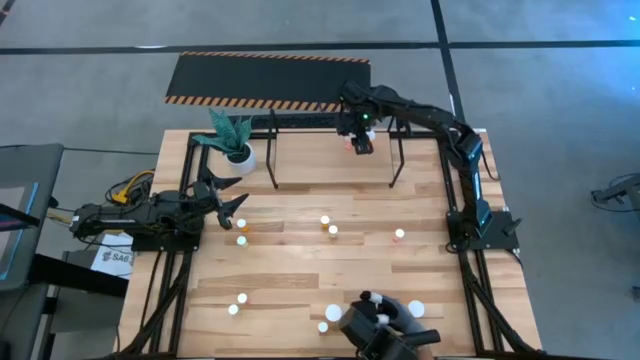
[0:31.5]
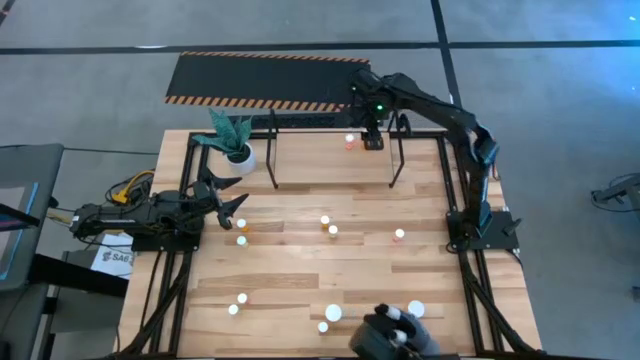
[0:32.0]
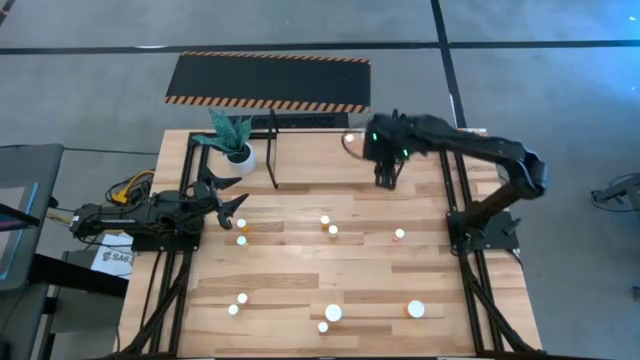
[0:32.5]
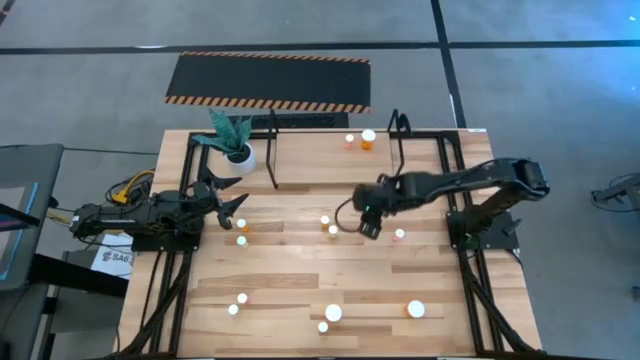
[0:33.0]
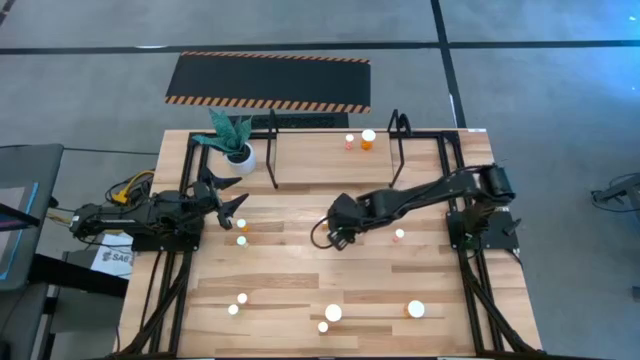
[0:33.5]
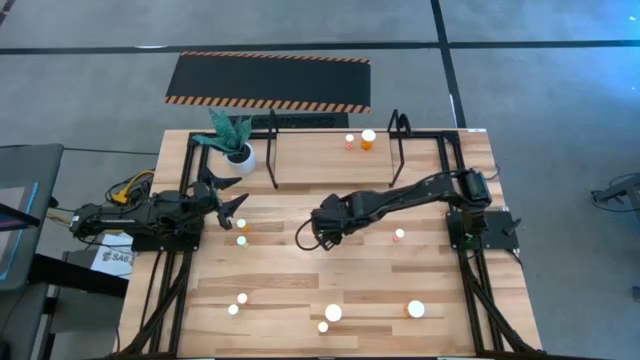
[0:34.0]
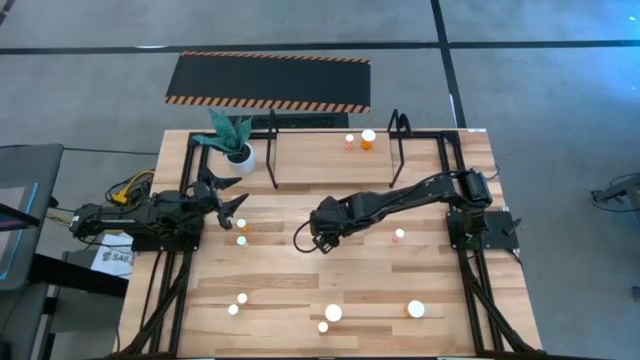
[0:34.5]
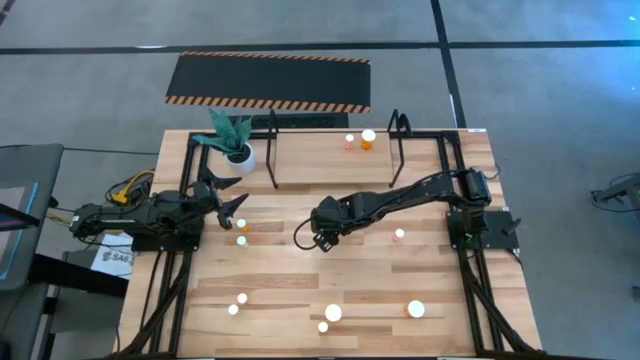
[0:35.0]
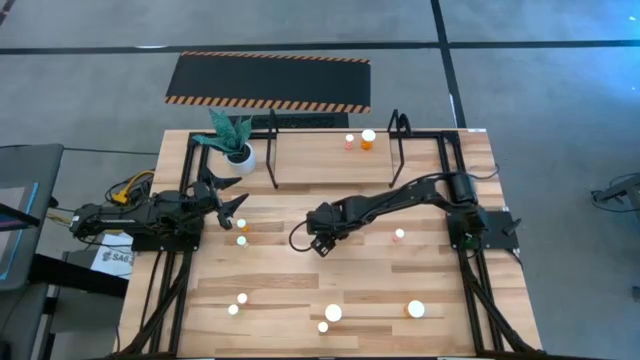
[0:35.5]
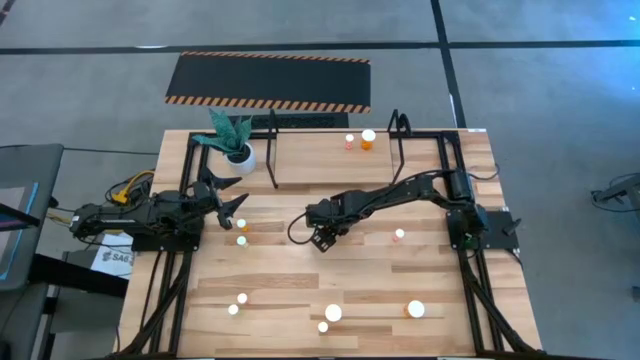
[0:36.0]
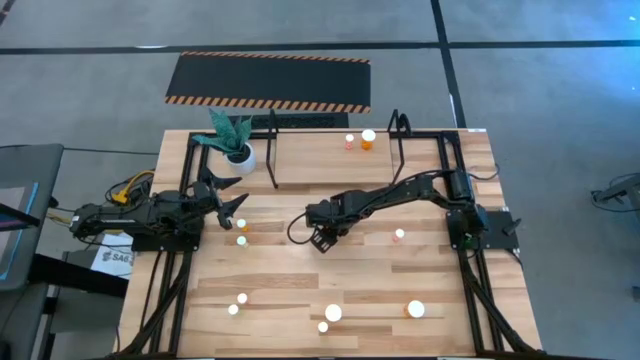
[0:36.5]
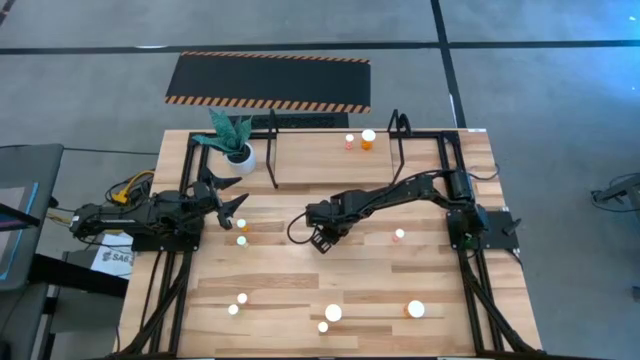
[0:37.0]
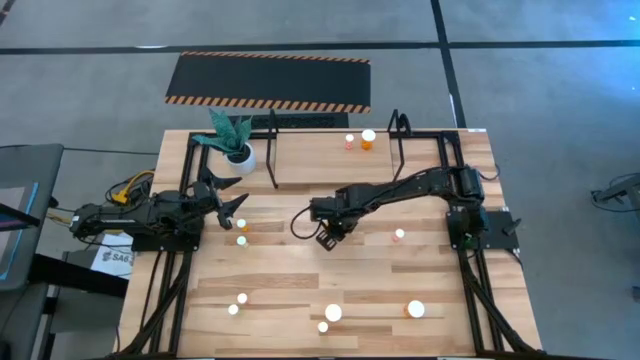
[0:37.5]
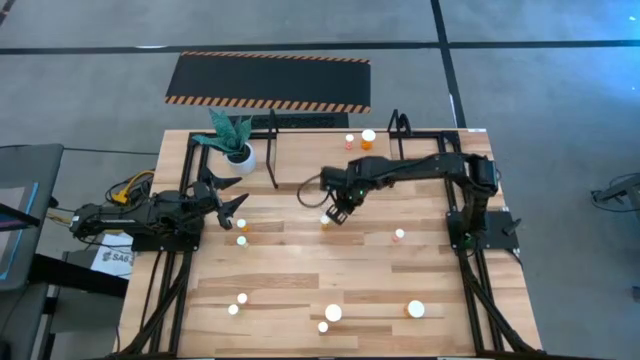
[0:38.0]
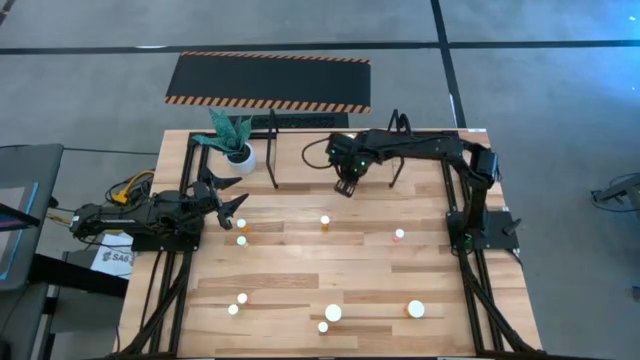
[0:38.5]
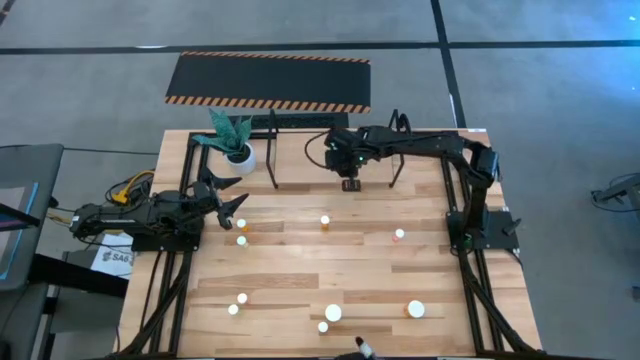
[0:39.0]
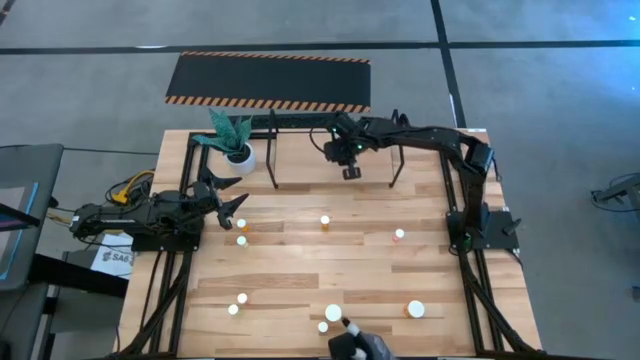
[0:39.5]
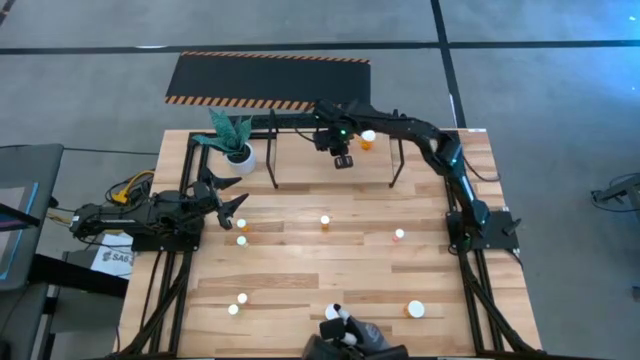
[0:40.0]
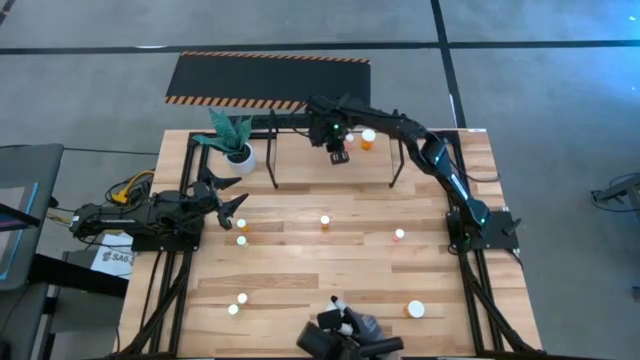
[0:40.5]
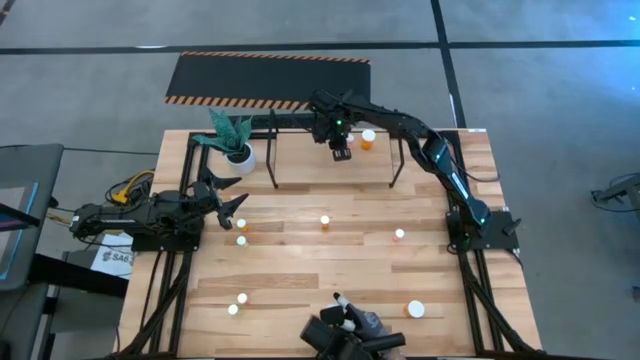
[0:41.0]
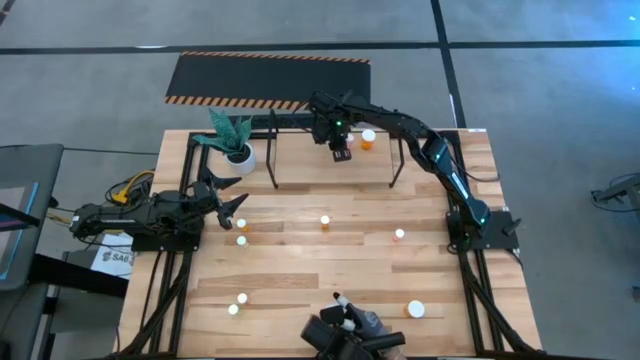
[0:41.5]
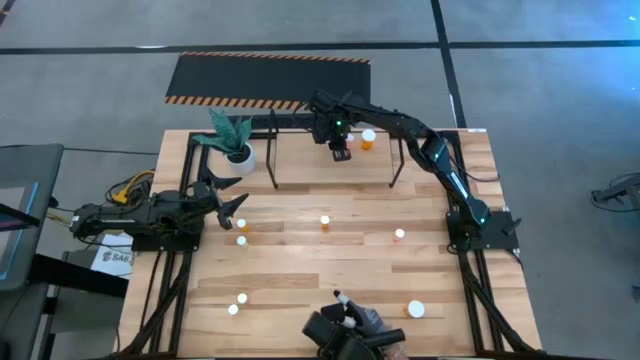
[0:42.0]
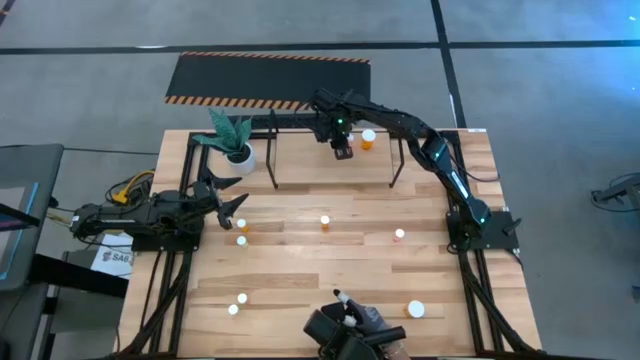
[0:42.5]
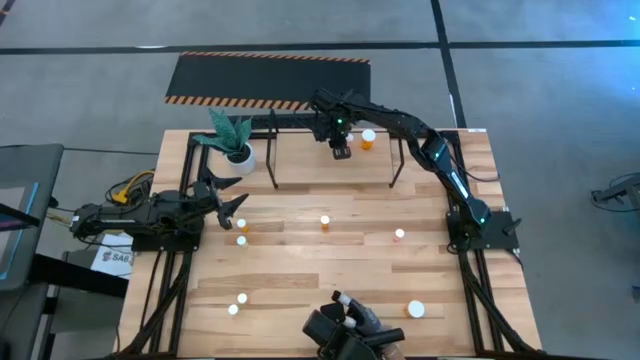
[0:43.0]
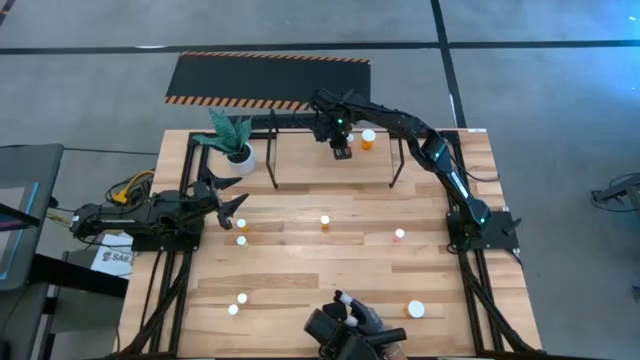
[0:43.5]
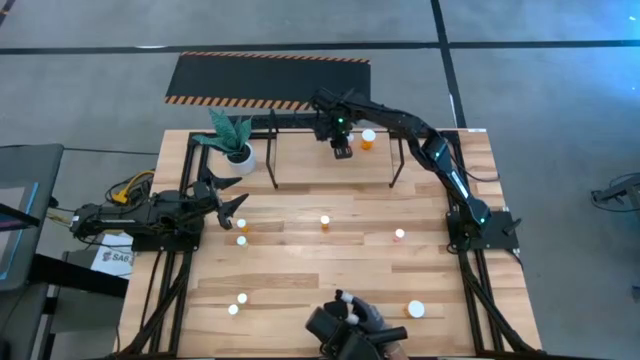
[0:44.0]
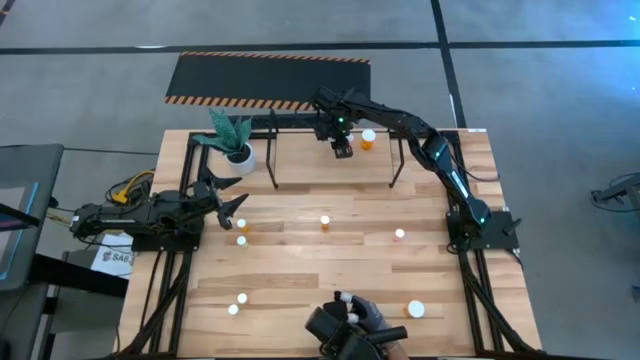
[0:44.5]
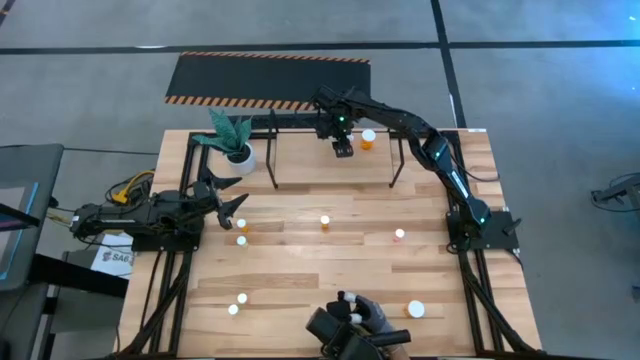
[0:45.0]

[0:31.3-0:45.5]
Task: Pick and place medicine bottles onto shelf by color
Put the top right small yellow pill bottle on the shelf

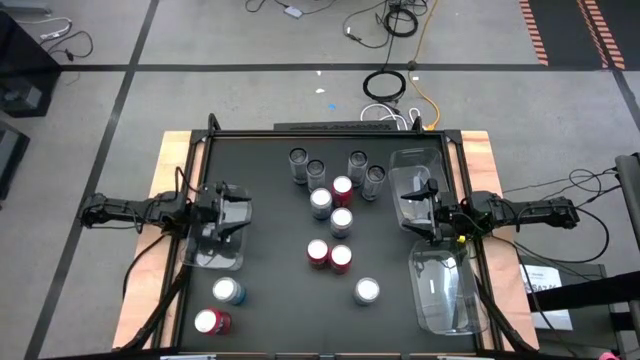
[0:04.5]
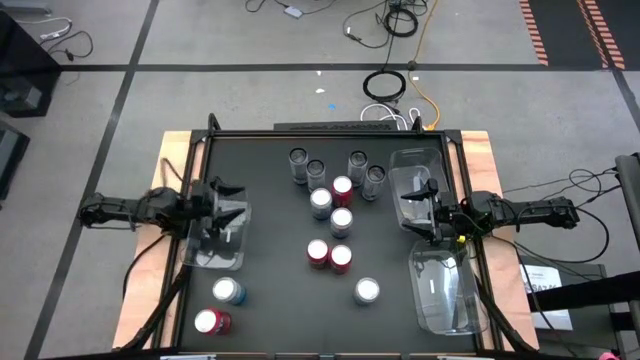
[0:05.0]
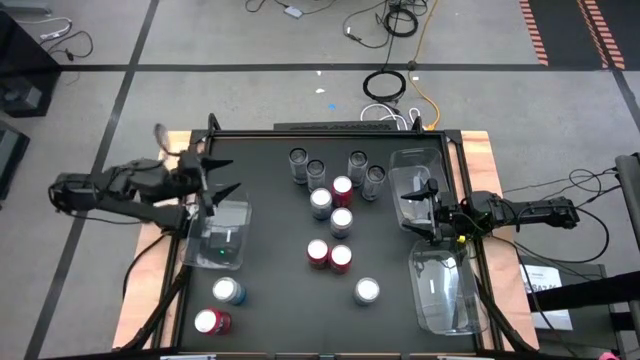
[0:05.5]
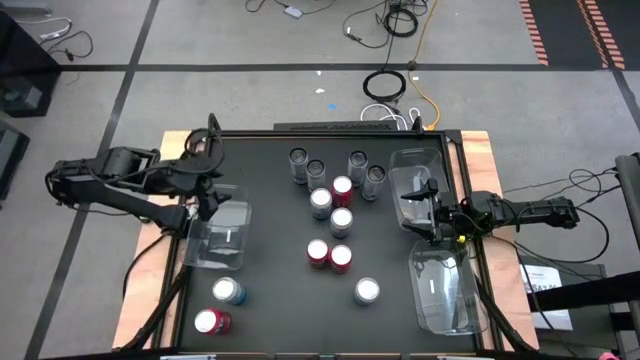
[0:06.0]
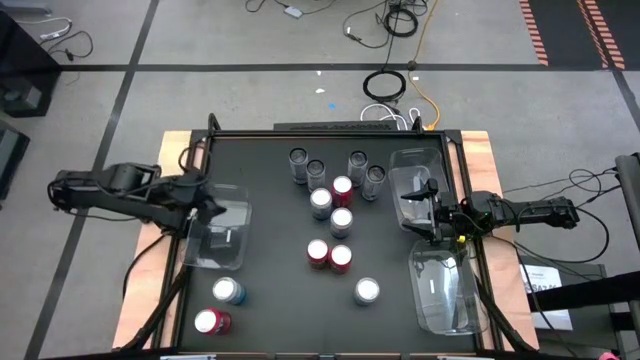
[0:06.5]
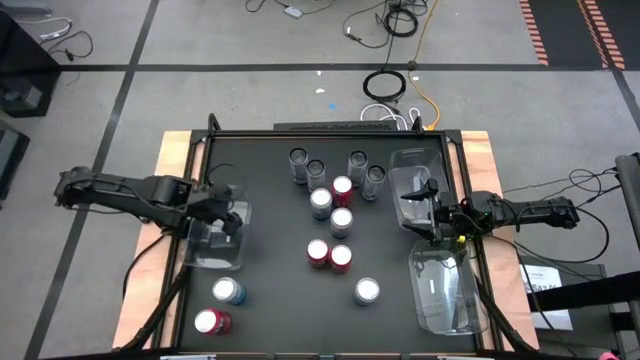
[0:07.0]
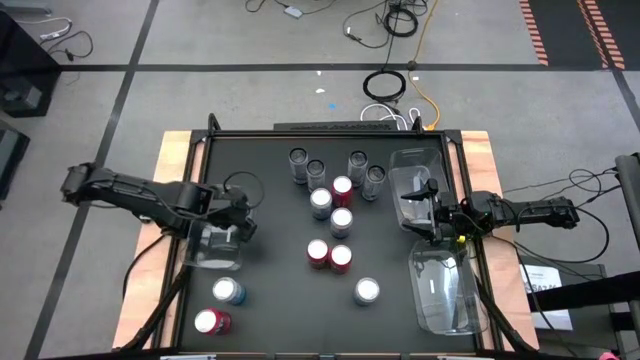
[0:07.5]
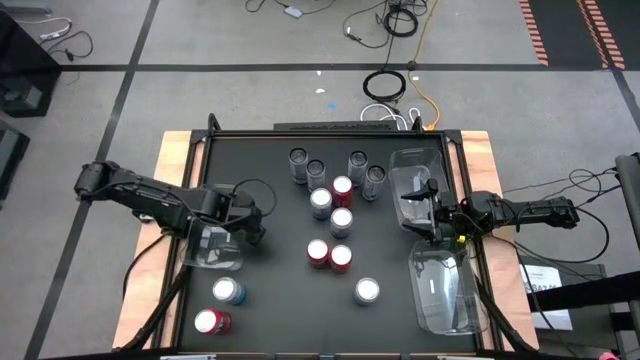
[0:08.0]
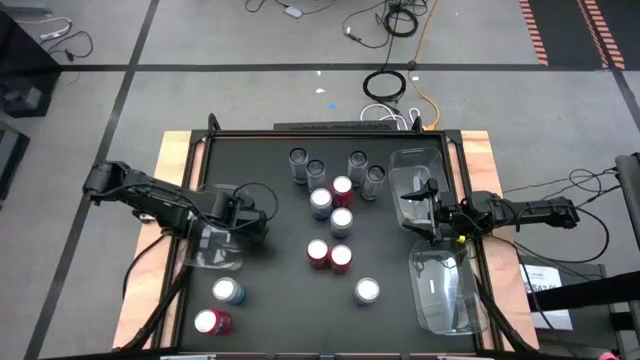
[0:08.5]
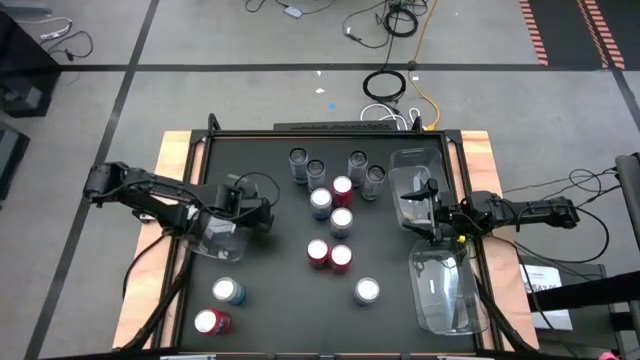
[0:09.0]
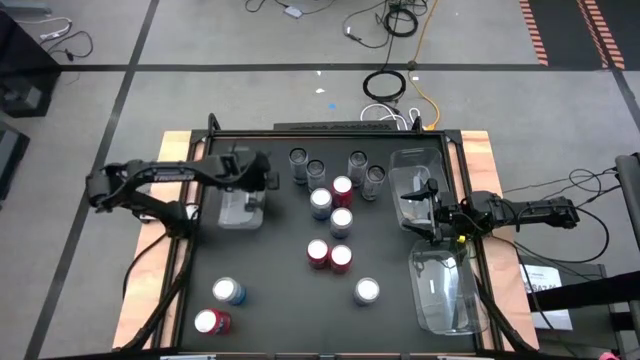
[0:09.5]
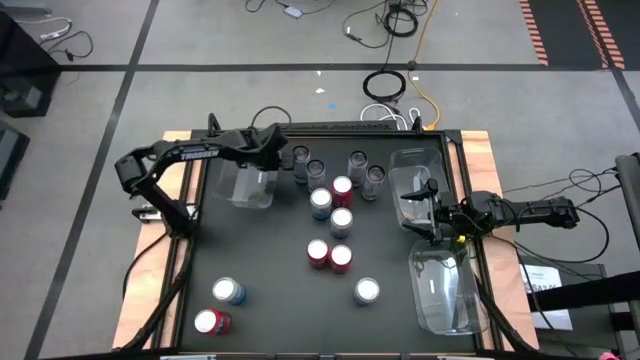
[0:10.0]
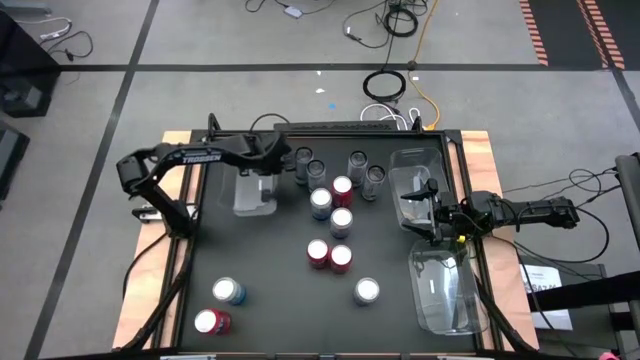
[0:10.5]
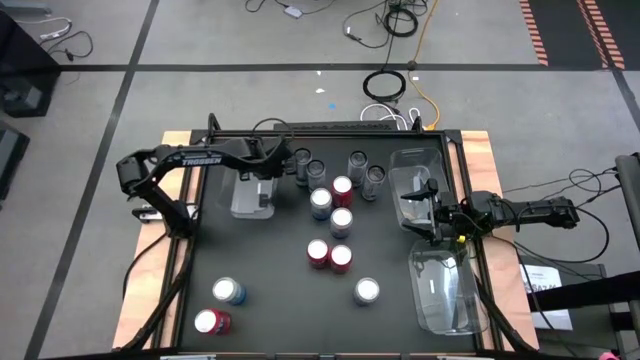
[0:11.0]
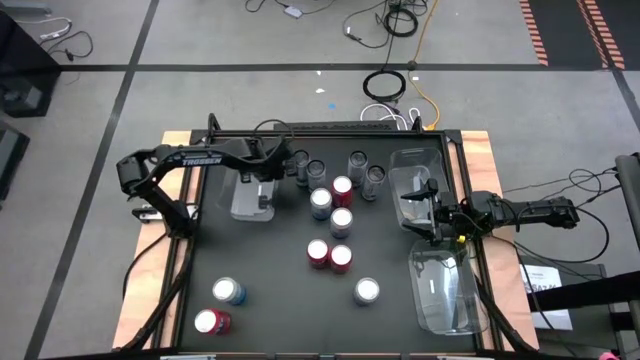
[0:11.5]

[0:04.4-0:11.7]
Task: Sort soda cans
Move the left transparent bin to the top left of the table
